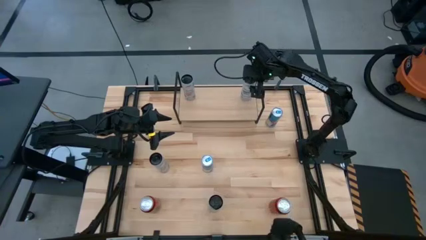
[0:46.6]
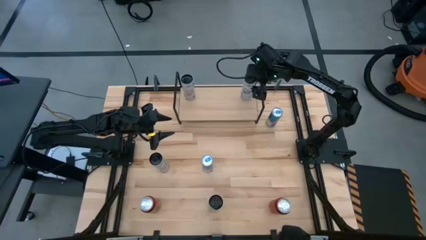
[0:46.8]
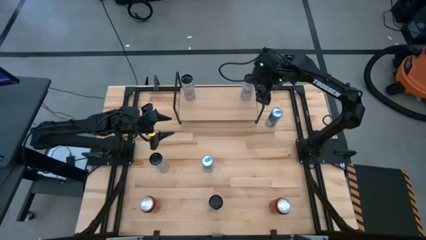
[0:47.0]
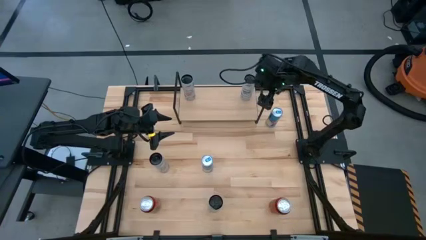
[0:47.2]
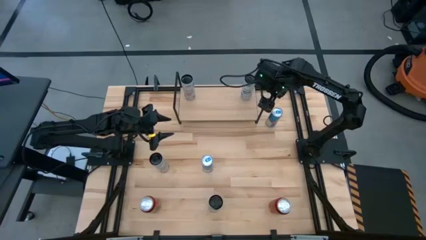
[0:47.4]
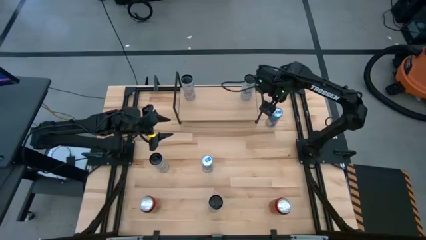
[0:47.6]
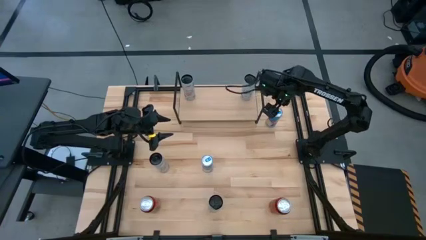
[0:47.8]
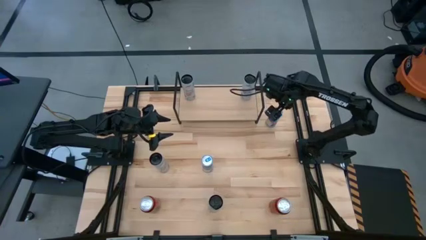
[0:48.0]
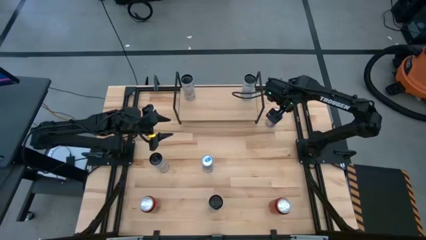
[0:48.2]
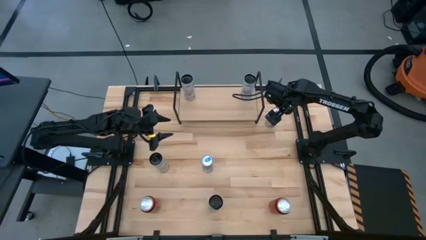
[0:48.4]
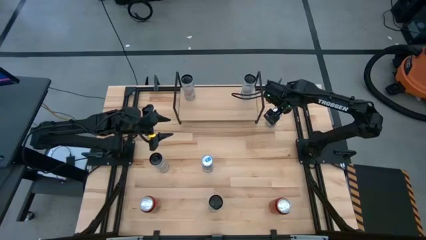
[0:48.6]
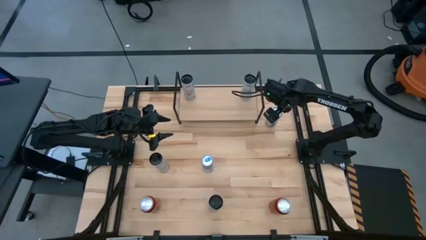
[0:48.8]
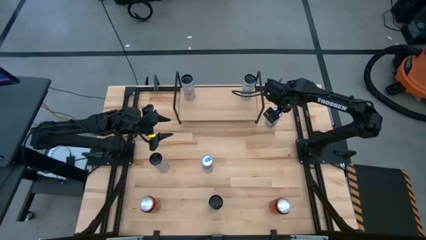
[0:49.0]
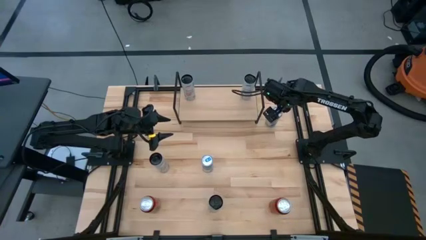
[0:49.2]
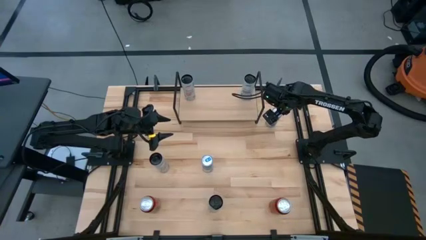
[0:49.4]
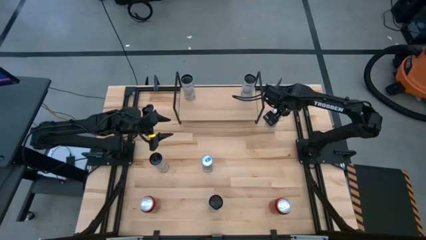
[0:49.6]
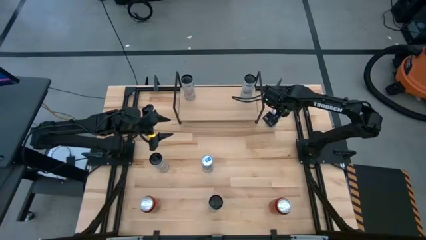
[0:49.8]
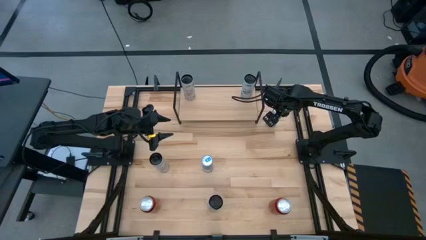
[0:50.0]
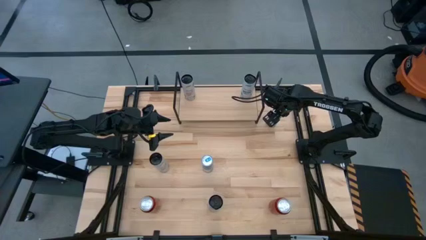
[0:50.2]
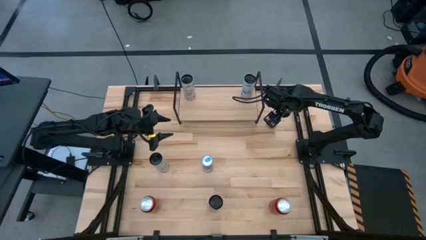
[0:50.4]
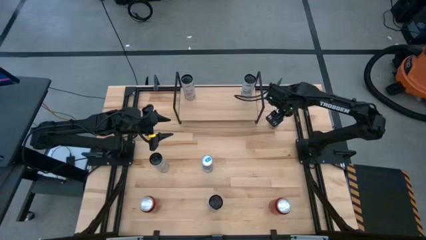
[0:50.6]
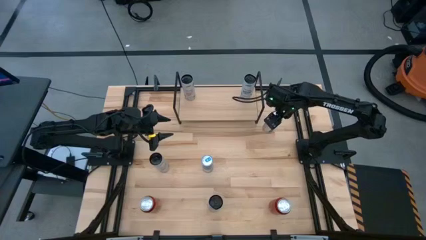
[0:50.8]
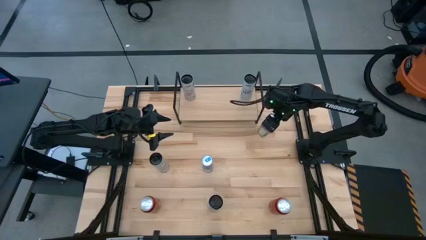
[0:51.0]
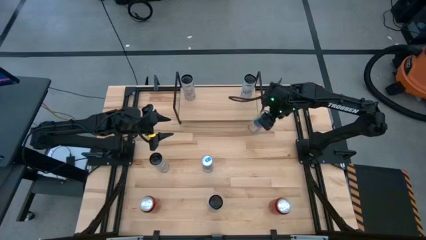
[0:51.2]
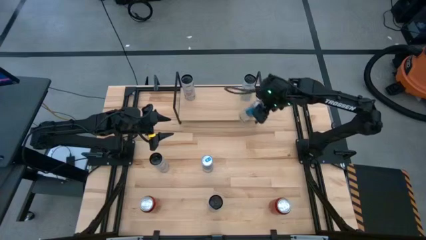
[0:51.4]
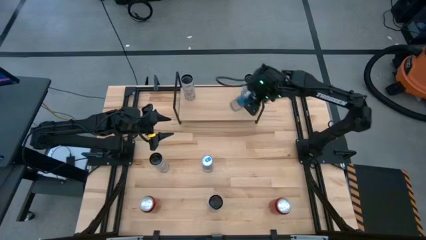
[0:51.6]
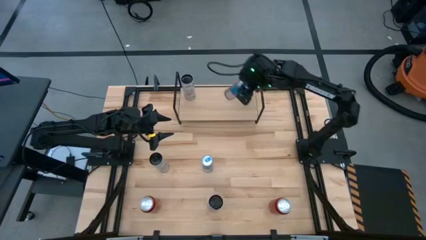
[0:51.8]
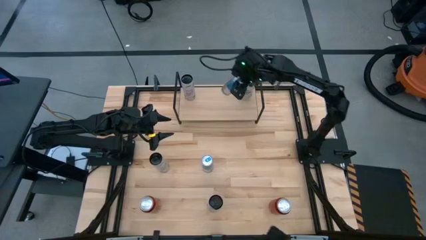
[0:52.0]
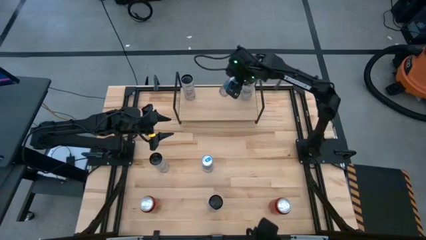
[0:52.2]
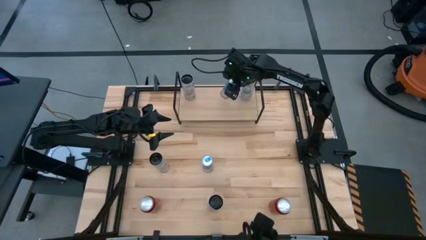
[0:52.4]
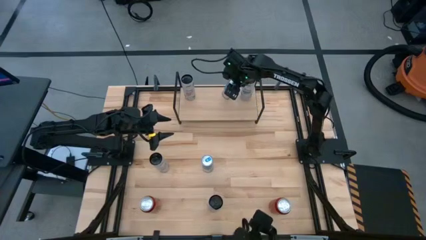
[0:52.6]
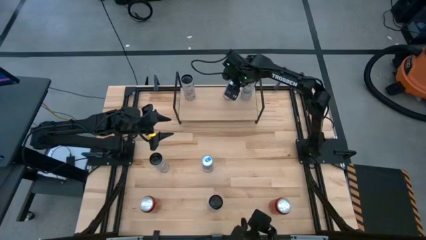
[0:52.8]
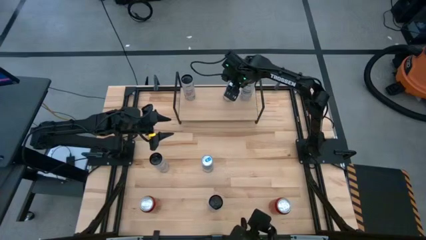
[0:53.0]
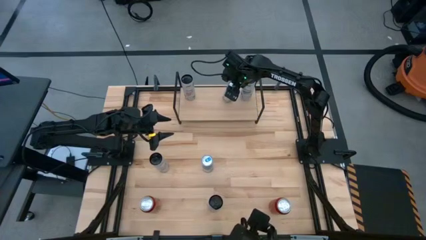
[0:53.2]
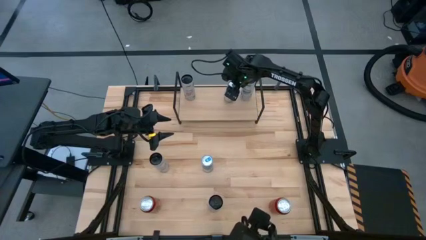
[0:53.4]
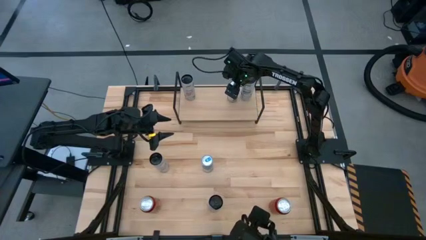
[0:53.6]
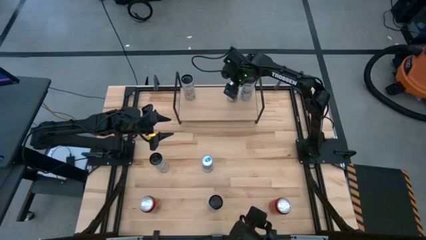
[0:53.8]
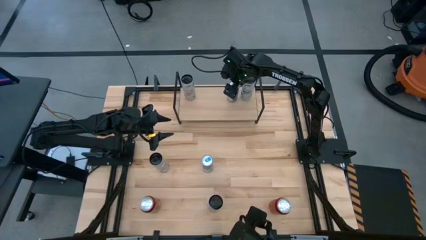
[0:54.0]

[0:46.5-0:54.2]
Task: Place canned beverage on shelf
Put the top blue soda can on the shelf

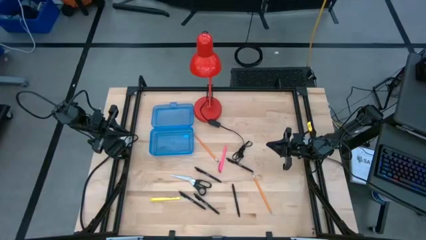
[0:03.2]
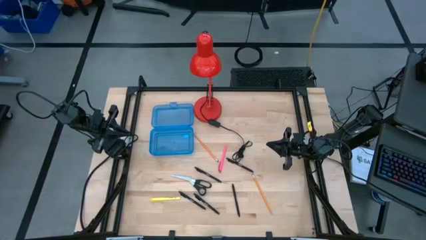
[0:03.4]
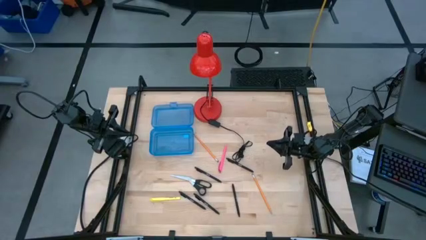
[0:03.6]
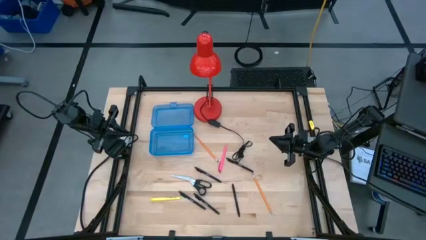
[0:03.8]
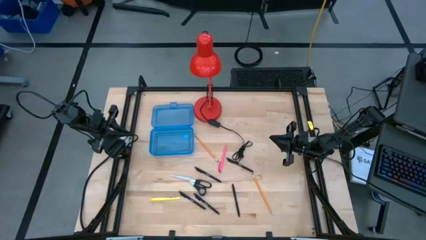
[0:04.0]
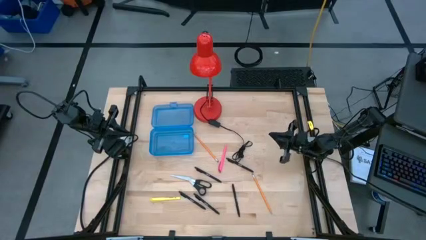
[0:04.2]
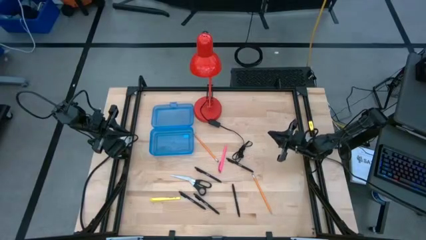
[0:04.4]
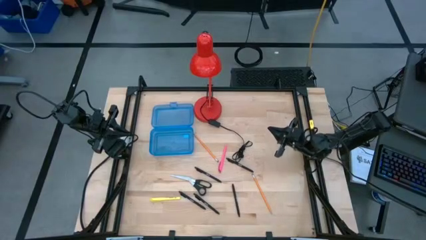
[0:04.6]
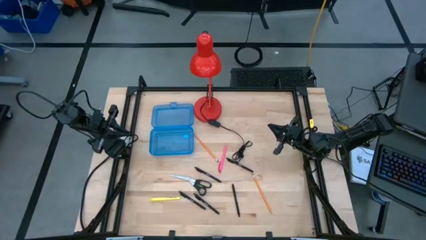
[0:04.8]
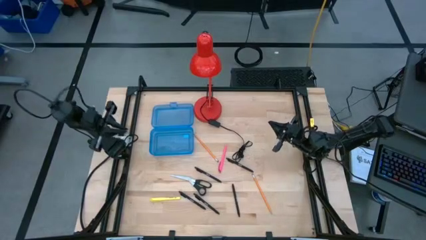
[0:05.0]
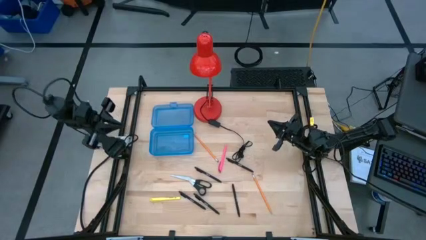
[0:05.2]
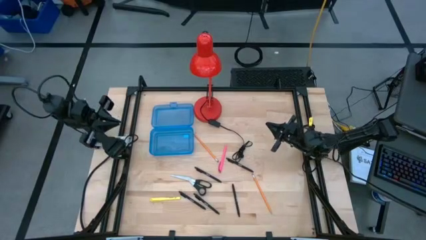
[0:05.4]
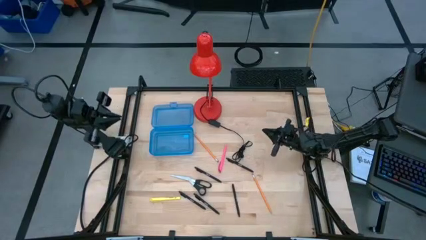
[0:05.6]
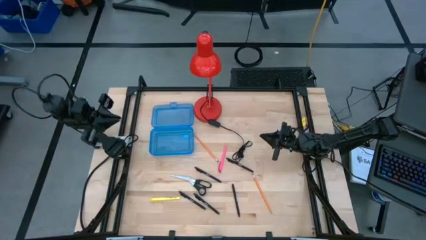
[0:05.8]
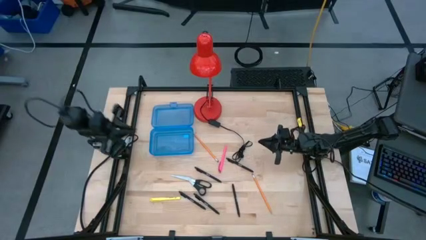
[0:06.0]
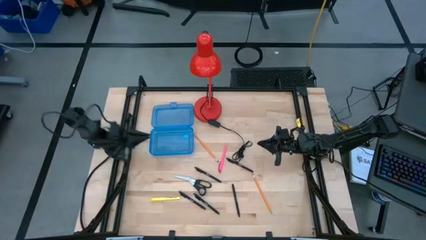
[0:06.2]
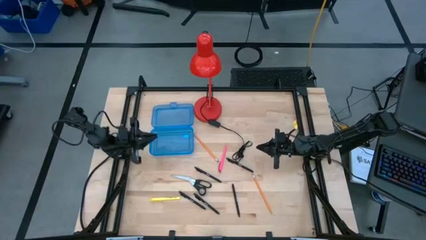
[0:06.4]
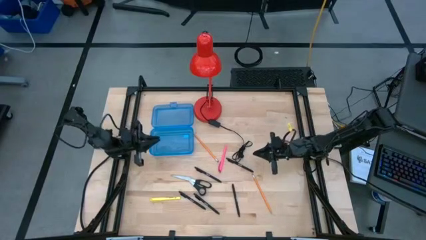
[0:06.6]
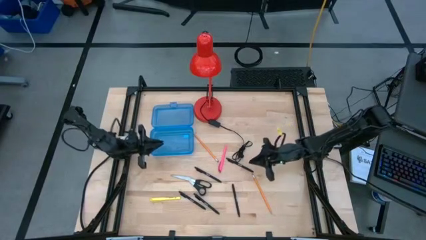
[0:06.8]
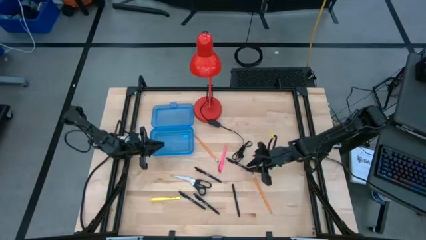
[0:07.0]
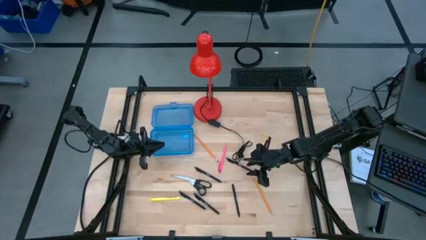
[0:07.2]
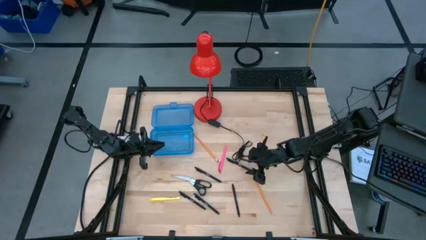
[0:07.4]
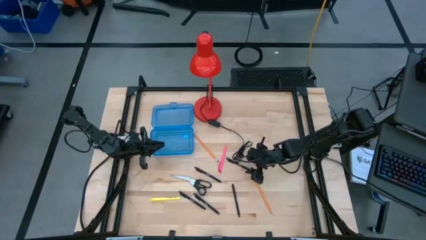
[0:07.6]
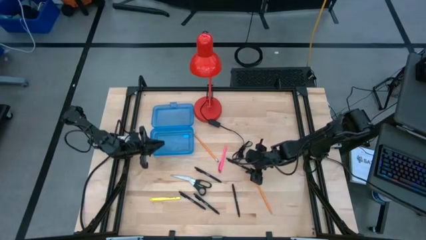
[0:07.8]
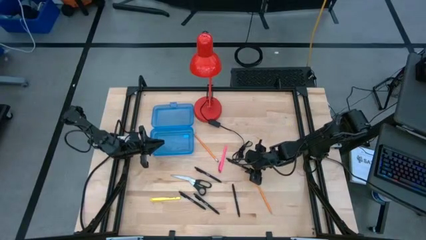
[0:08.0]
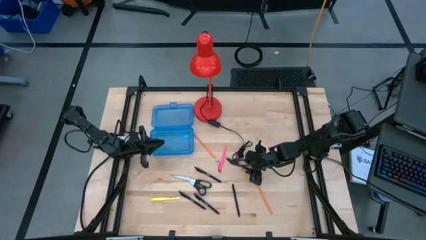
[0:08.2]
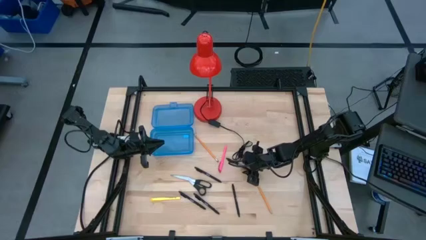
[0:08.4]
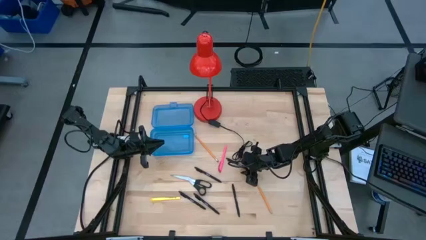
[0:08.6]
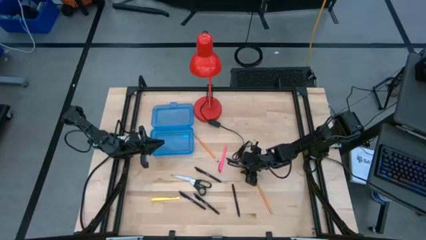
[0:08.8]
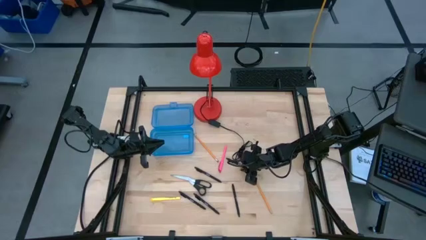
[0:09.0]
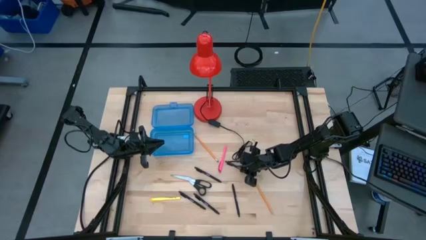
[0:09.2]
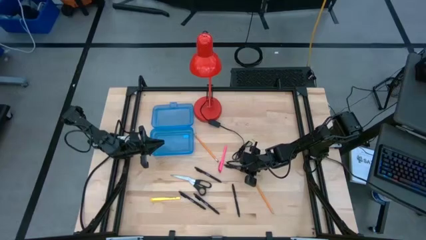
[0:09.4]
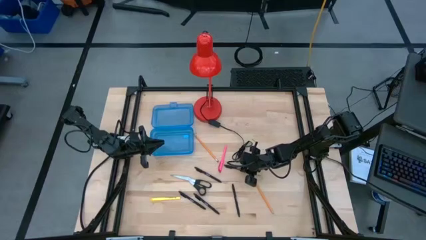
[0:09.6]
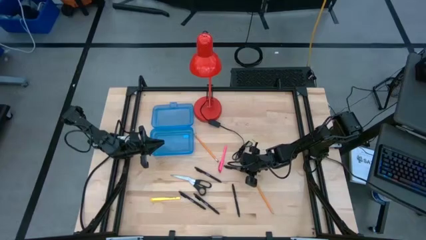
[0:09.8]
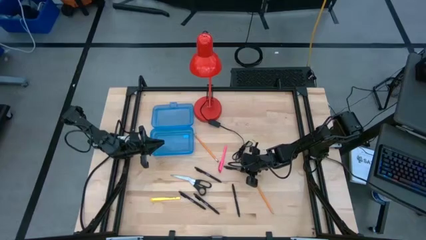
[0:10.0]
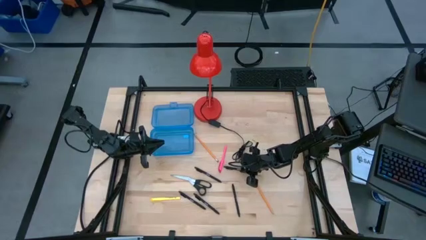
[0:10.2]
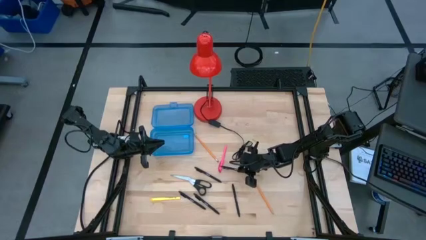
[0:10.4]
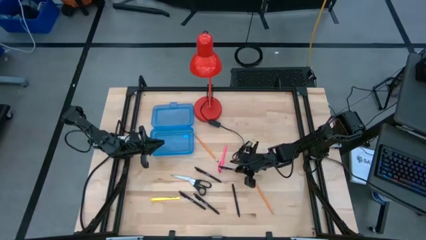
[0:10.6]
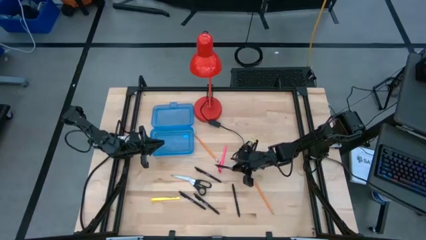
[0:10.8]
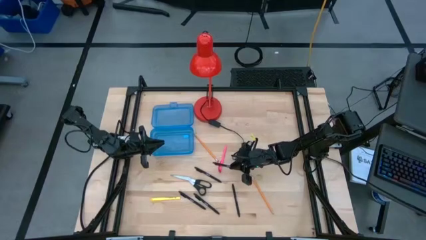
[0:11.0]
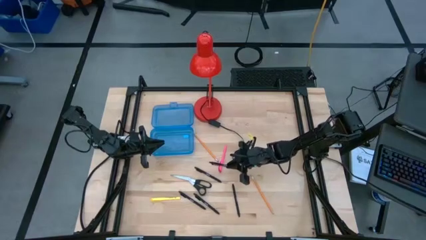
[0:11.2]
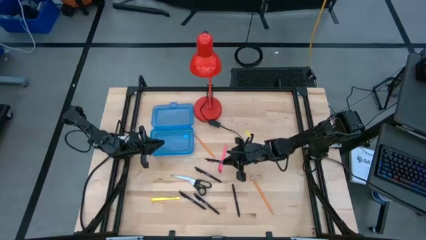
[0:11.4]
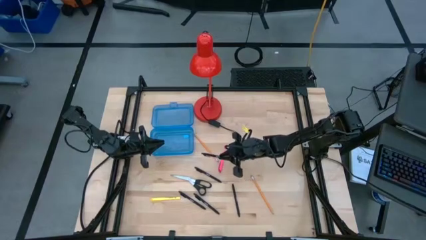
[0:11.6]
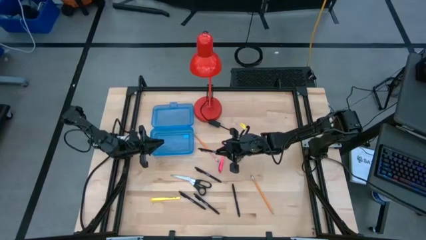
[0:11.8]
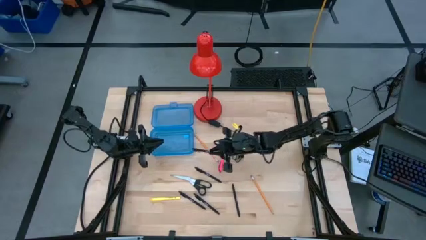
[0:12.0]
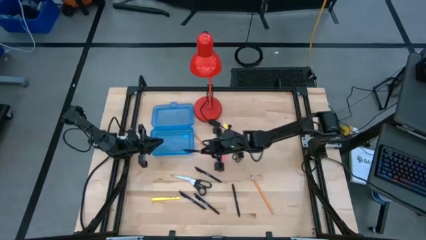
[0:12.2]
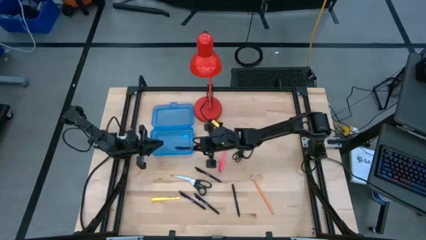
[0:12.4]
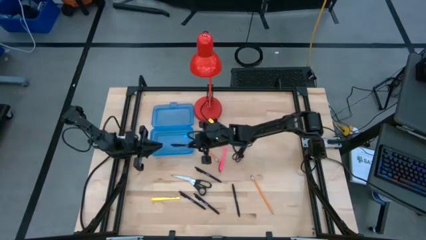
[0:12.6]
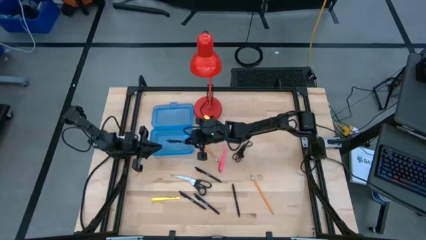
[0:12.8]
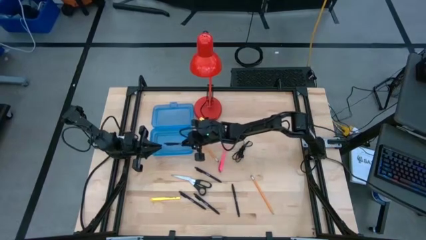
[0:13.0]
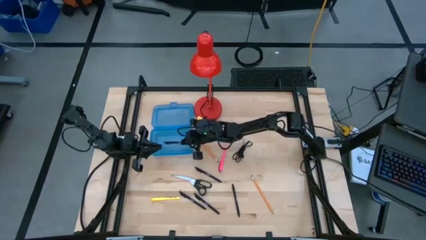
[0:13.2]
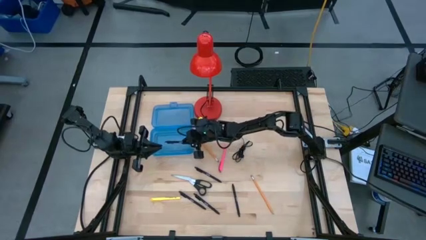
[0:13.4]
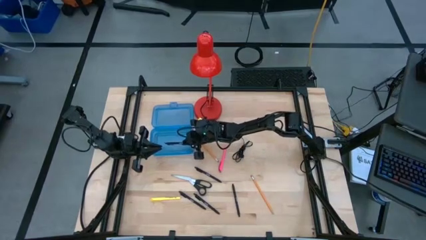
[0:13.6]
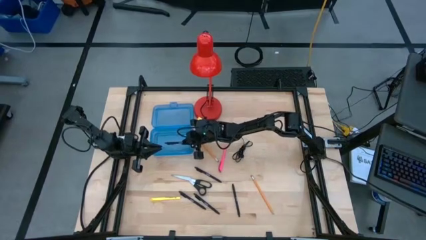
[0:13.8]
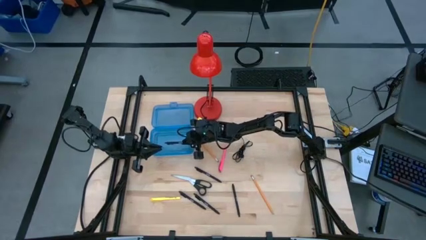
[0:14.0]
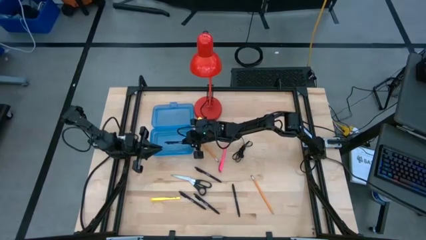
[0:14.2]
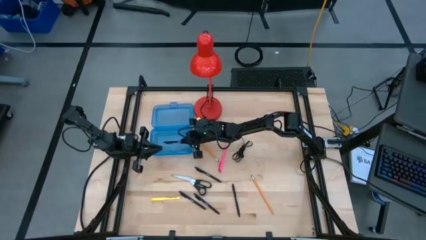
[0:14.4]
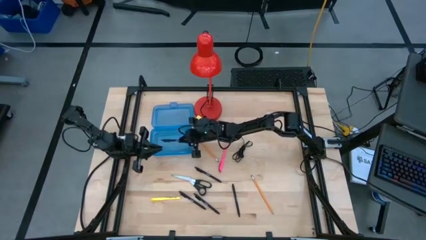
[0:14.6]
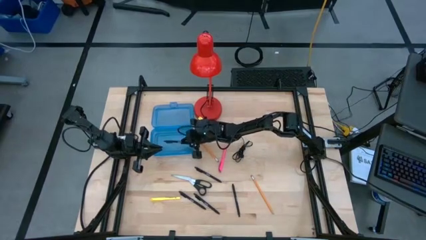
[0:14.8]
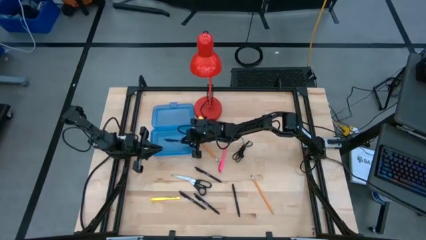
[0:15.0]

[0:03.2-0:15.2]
Task: Pick & place school supplies into a supply box
Put the black pen into the blue supply box
